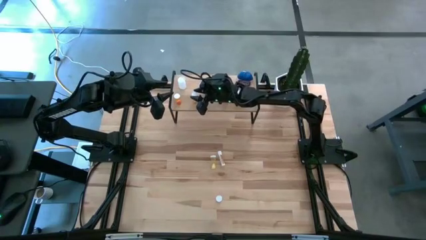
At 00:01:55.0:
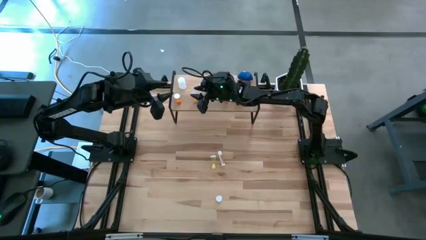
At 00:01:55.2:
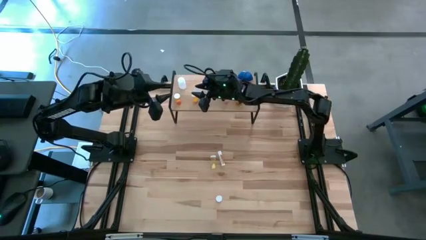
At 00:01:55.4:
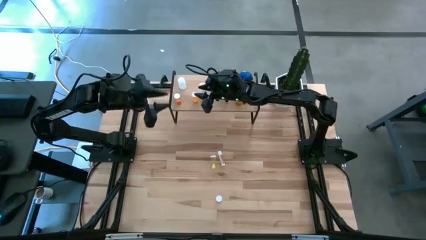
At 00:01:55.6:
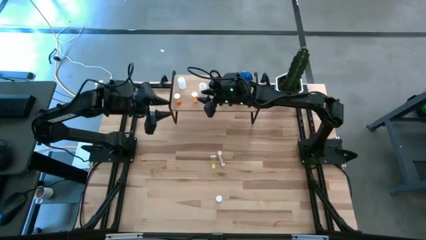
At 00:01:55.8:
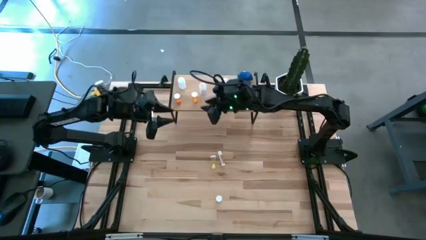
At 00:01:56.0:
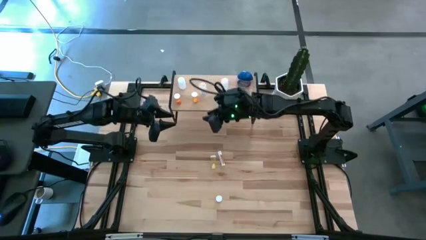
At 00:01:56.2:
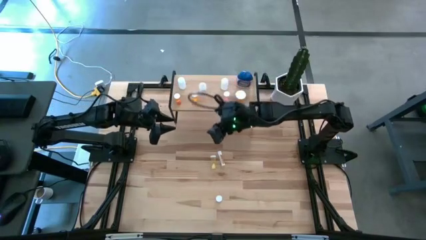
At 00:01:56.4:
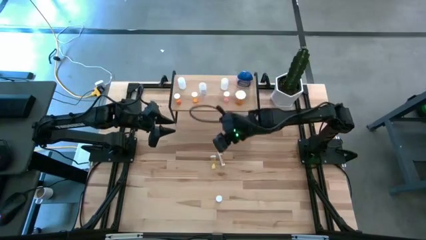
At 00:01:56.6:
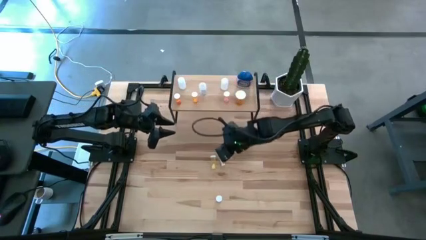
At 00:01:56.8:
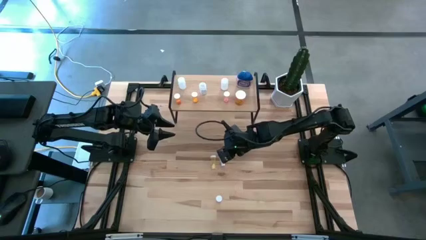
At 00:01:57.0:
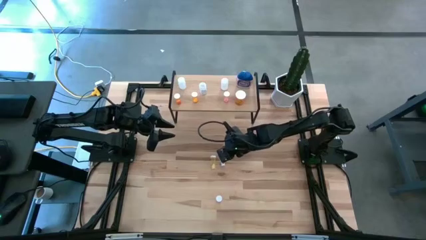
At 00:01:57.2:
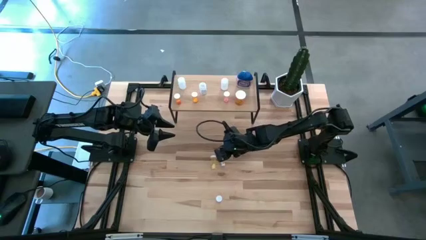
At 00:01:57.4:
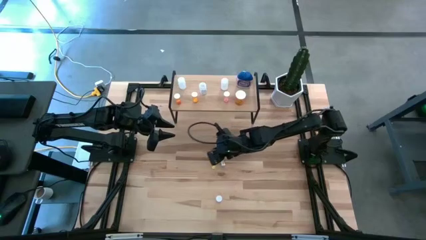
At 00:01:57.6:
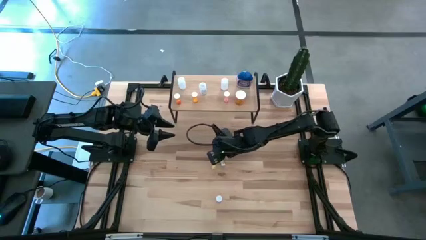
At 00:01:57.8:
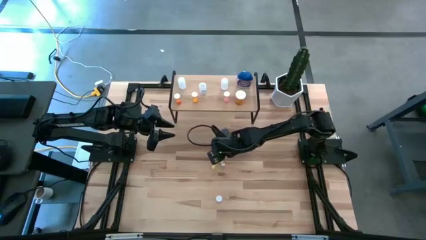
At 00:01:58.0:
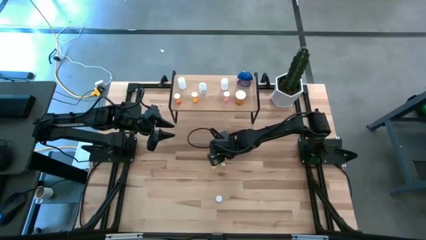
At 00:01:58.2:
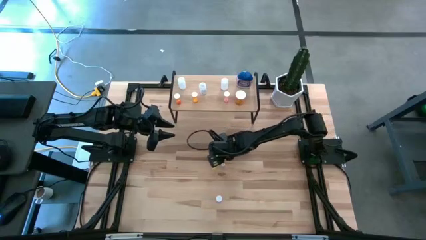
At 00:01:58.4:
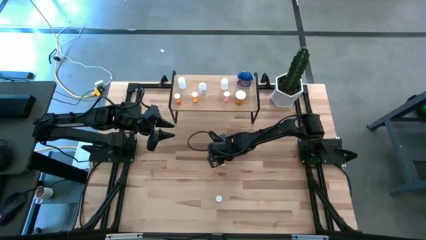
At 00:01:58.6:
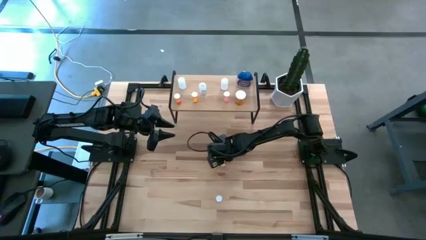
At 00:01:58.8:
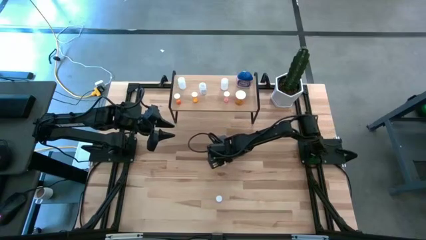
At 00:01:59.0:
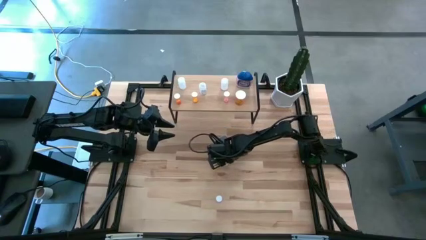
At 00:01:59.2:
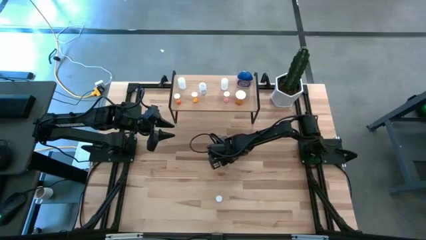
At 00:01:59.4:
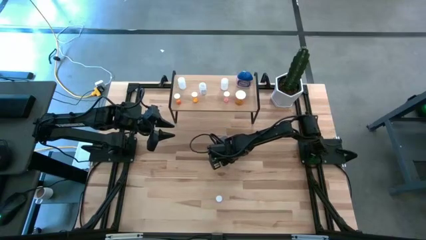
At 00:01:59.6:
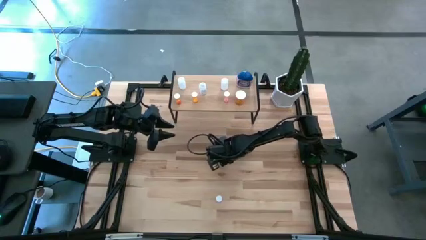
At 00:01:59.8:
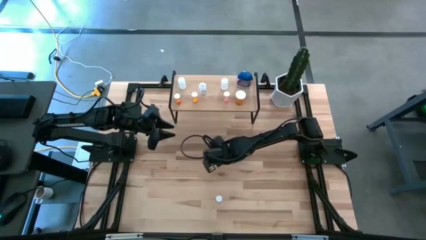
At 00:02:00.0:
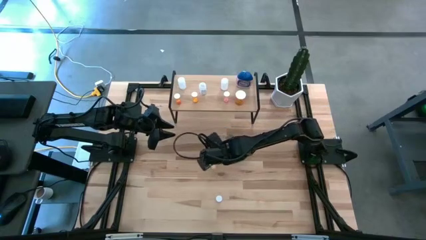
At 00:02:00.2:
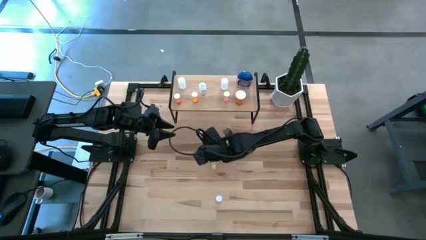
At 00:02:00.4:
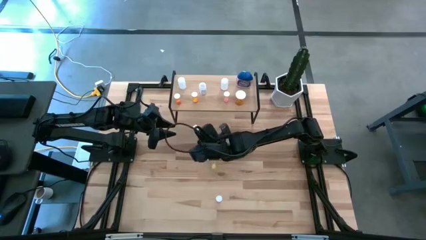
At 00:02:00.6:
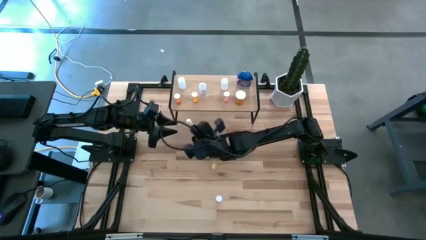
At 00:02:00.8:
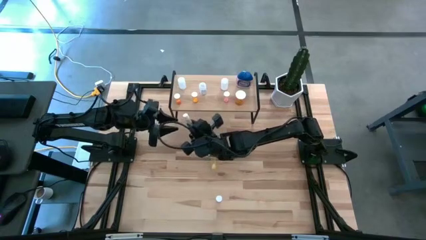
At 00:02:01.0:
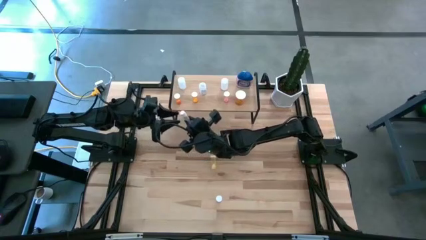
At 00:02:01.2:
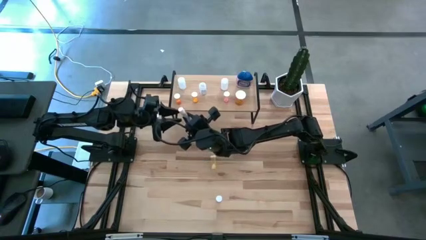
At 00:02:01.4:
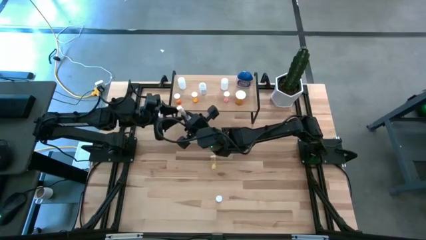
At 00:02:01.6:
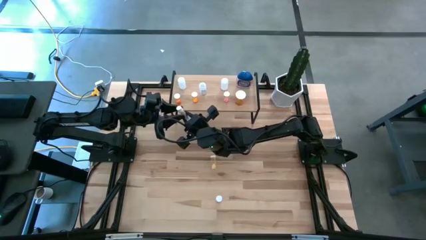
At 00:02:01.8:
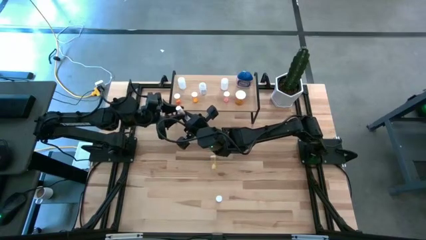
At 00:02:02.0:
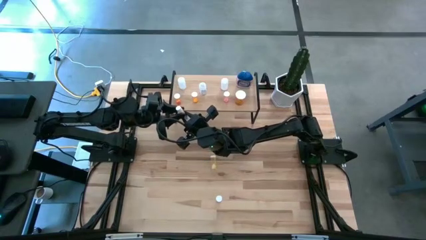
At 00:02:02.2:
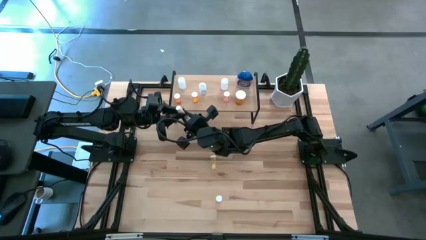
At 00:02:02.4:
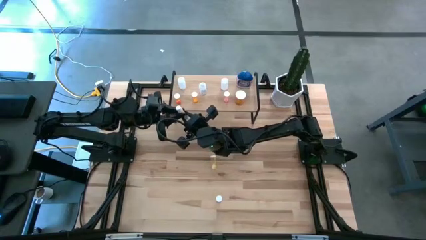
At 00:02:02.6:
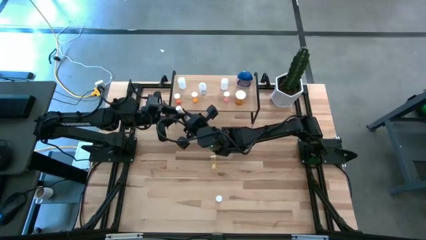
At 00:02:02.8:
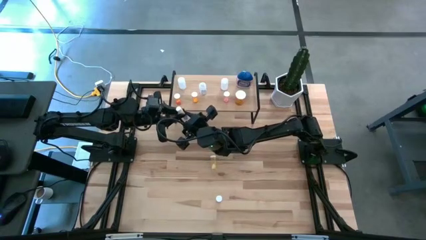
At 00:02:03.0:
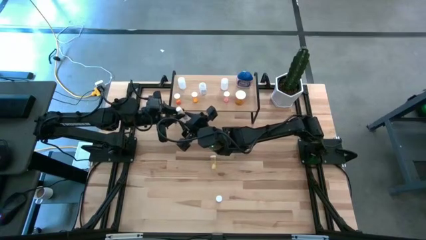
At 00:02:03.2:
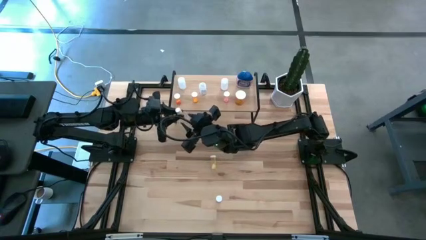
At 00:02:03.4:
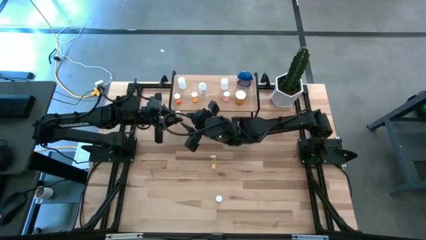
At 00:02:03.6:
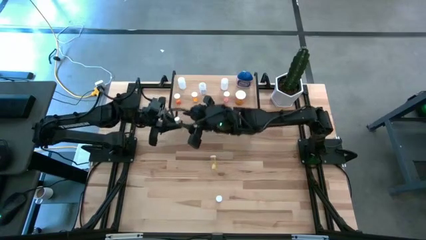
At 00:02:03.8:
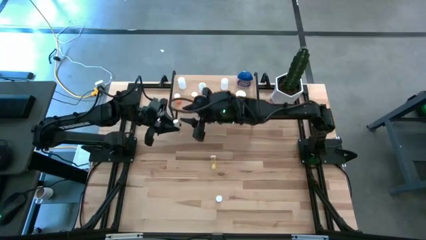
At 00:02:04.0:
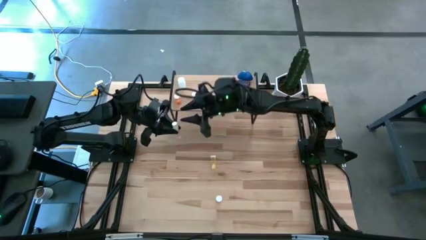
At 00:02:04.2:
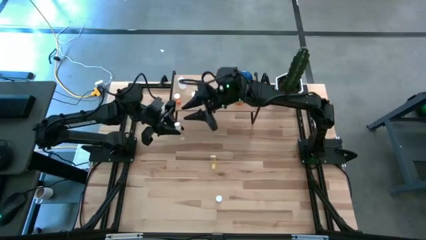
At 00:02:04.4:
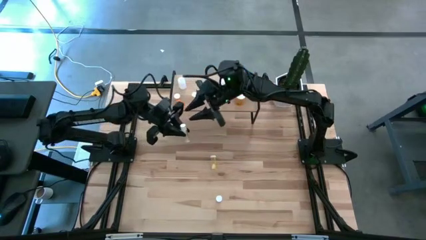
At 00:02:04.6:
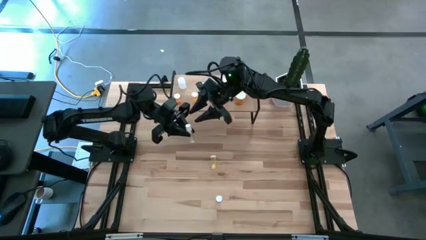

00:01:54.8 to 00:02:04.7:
Task: Pick and place medicine bottles onto shelf by color
Put the white pill bottle on the shelf

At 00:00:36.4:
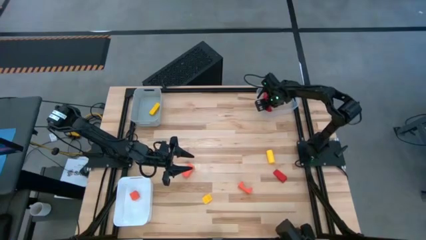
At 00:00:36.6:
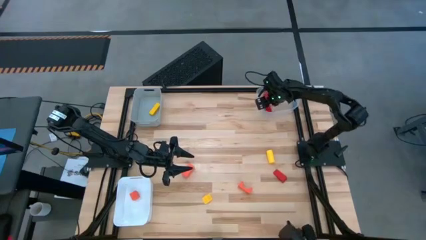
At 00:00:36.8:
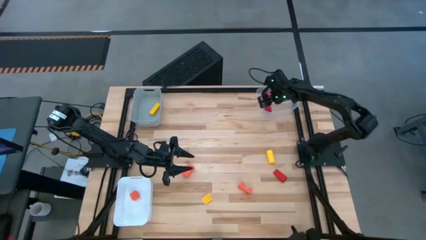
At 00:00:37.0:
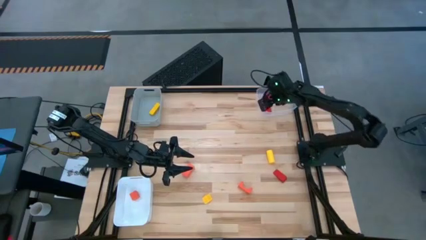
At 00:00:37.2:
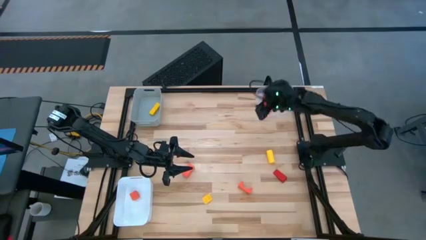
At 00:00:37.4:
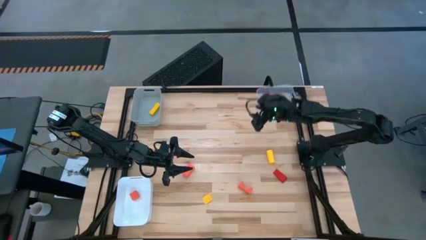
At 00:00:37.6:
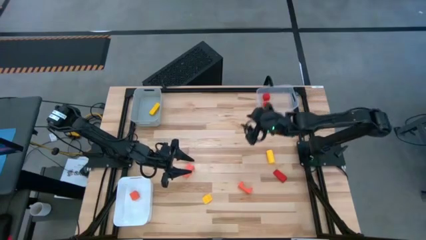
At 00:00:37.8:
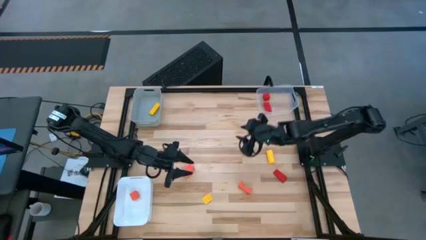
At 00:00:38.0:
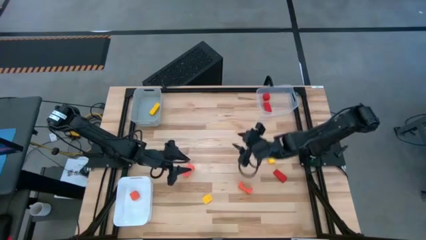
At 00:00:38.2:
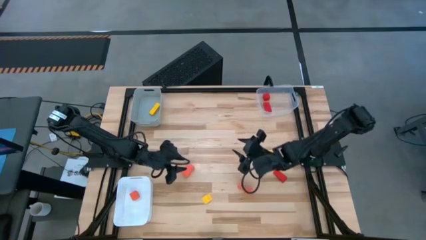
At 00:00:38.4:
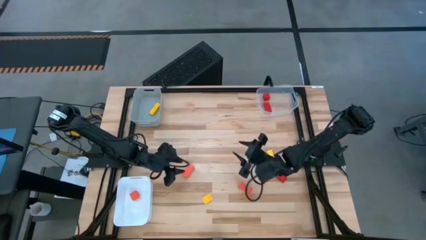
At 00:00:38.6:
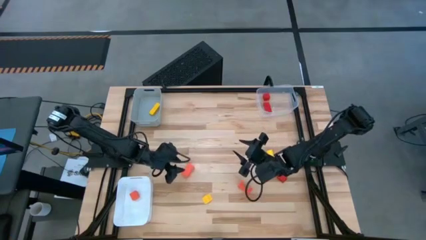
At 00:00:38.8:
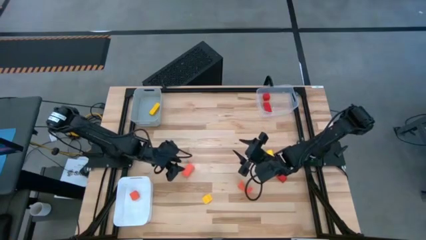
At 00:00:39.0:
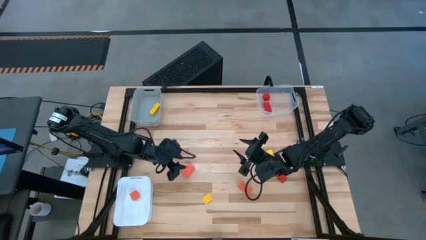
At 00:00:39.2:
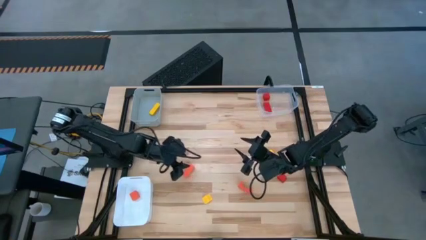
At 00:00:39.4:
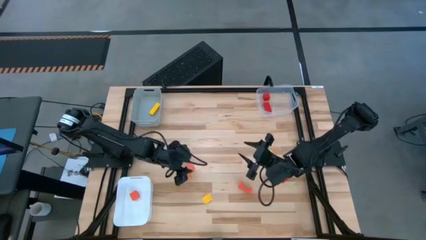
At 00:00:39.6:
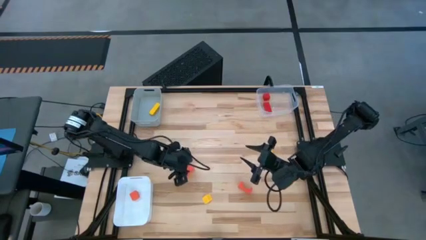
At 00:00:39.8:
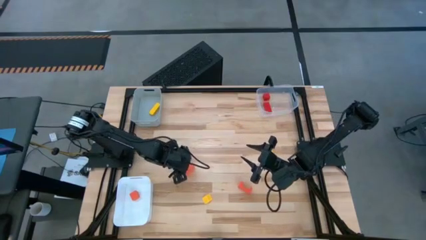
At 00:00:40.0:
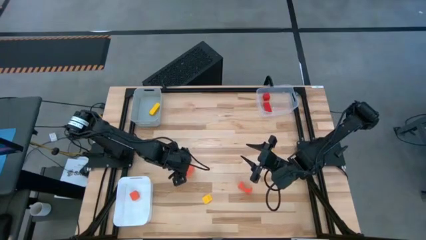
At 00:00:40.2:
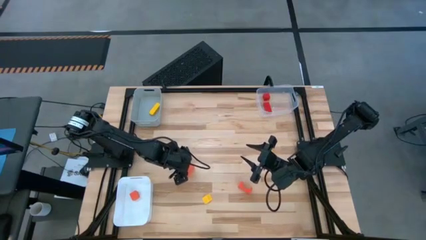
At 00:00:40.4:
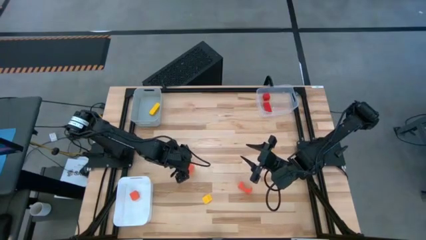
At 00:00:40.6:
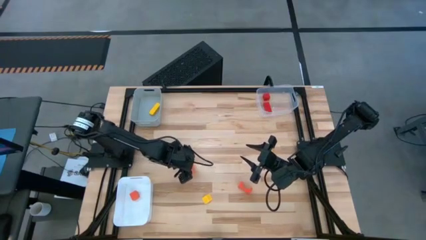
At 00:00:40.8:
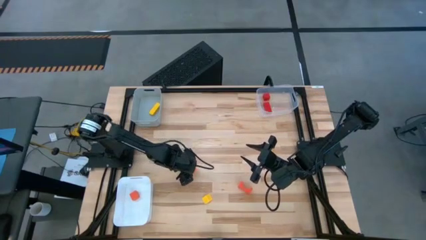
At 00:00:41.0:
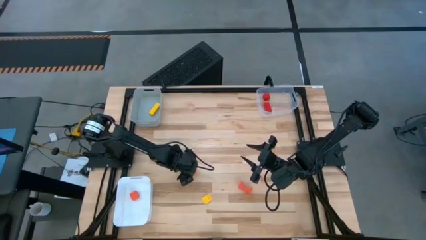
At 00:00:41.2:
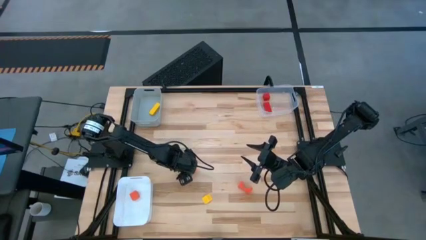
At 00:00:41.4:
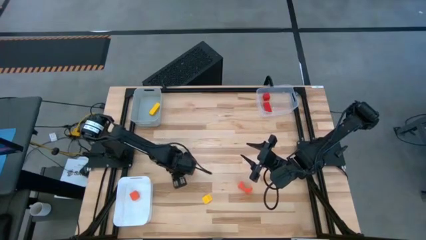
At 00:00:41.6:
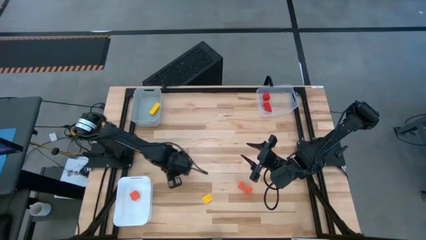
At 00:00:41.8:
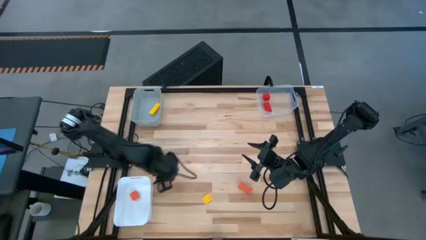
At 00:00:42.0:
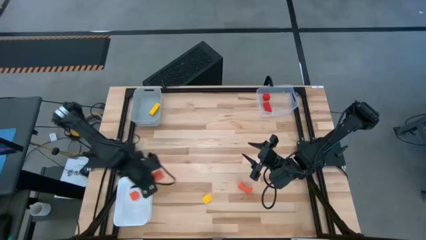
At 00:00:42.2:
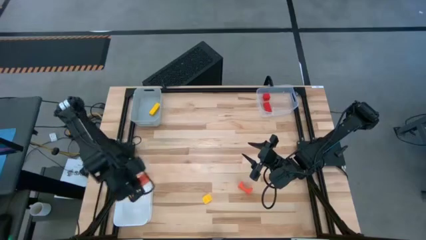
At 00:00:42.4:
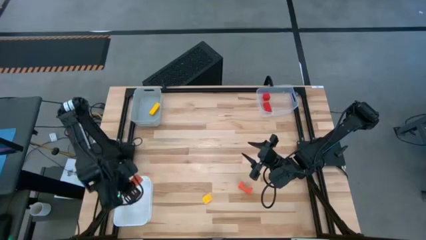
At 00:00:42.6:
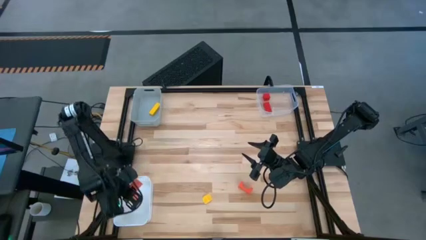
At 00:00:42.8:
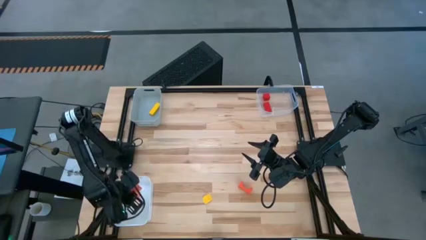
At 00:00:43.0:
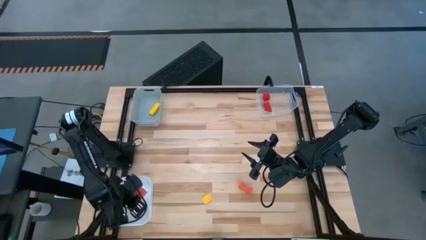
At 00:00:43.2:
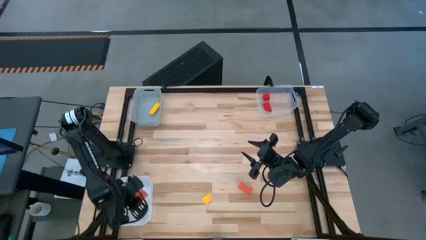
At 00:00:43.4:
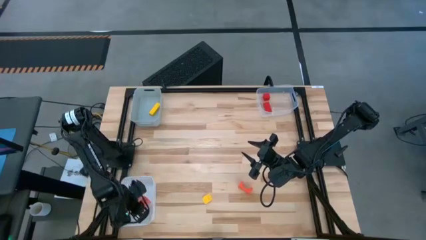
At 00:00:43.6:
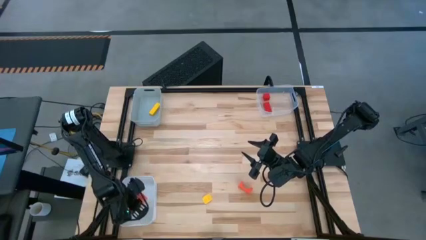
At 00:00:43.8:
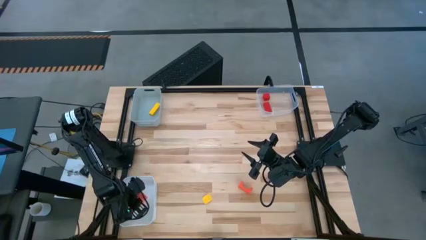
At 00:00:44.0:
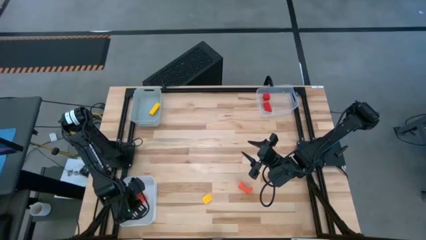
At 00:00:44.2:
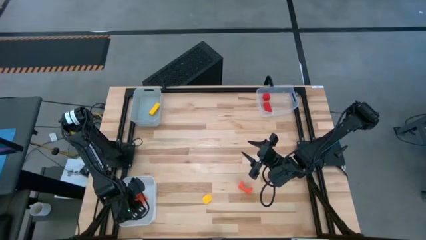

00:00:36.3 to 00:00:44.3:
Task: Sort & place blocks by color
Put the left orange block into the white bin
